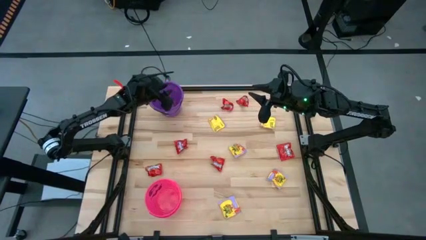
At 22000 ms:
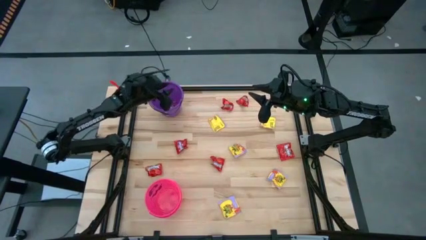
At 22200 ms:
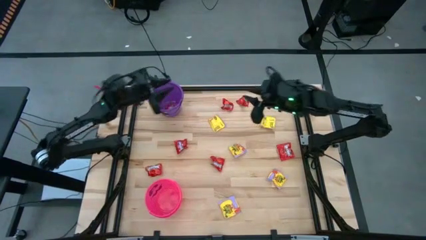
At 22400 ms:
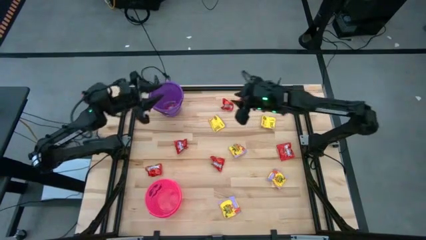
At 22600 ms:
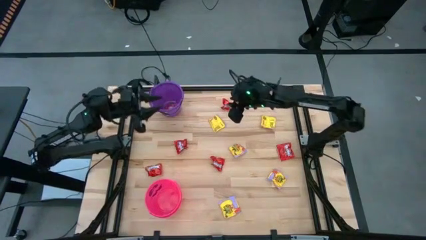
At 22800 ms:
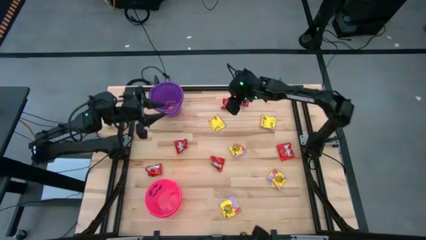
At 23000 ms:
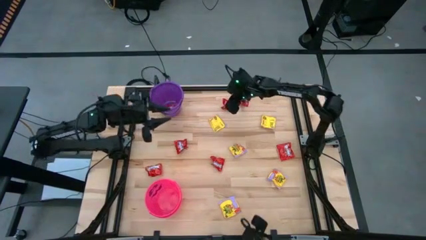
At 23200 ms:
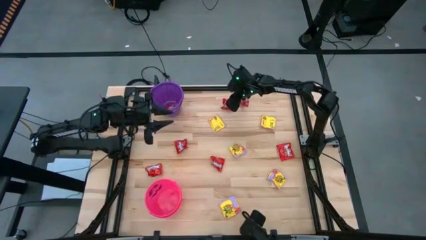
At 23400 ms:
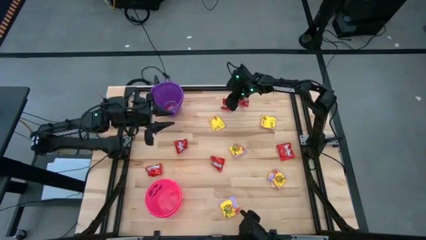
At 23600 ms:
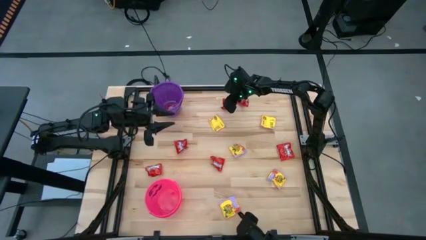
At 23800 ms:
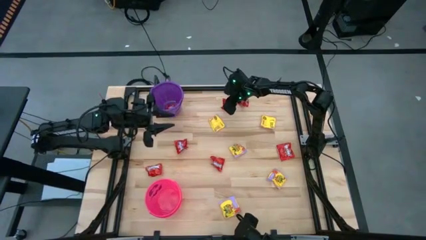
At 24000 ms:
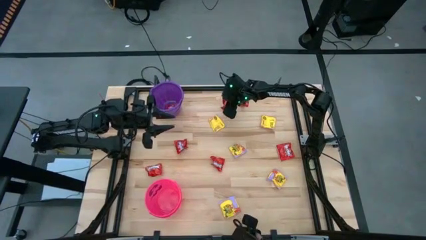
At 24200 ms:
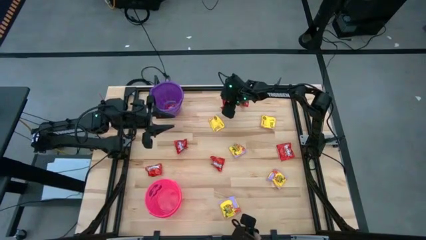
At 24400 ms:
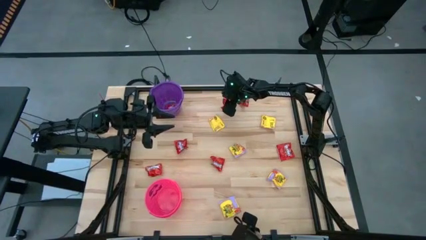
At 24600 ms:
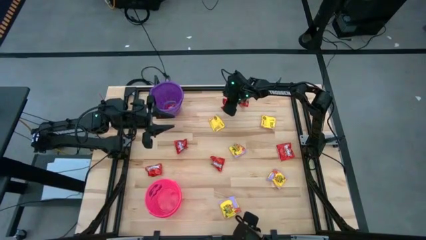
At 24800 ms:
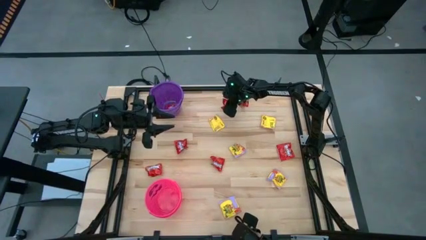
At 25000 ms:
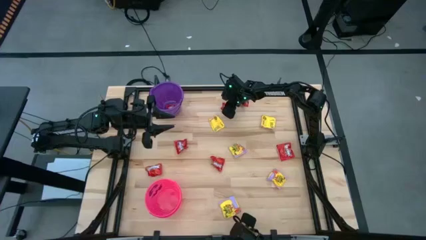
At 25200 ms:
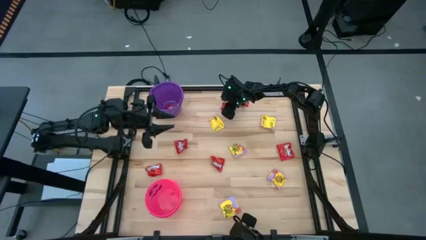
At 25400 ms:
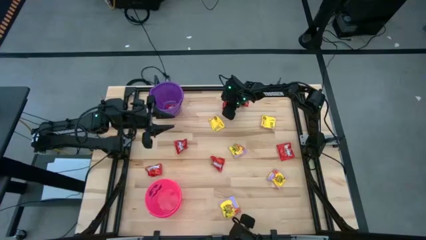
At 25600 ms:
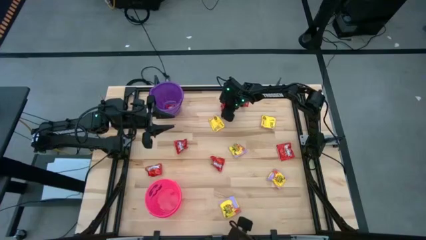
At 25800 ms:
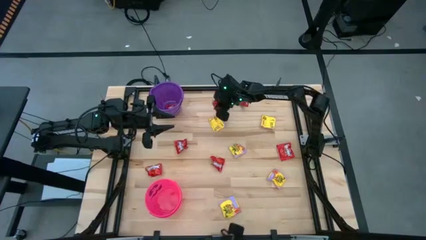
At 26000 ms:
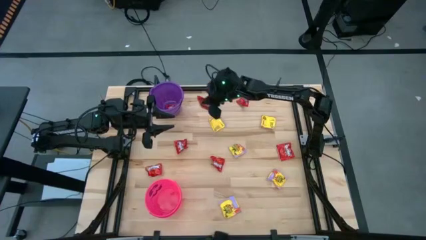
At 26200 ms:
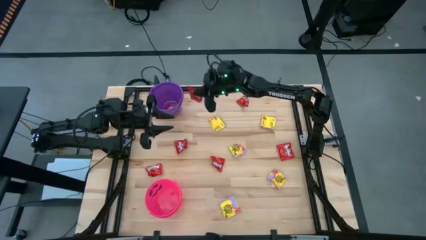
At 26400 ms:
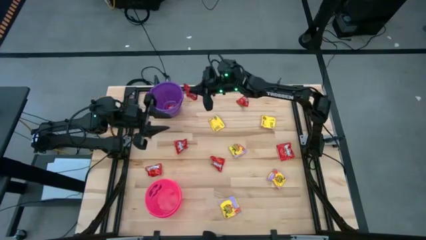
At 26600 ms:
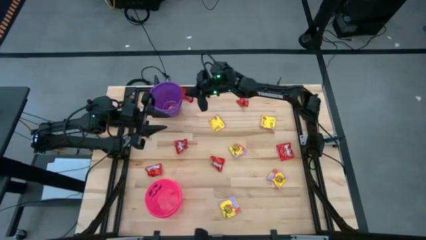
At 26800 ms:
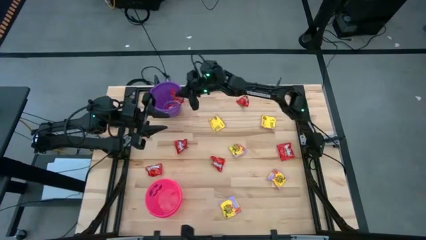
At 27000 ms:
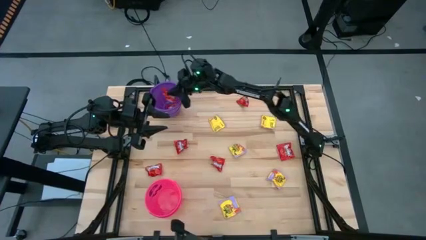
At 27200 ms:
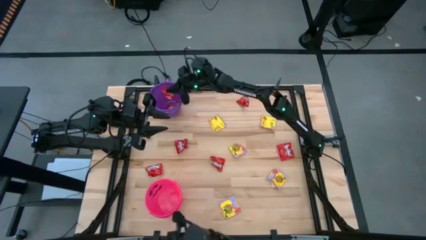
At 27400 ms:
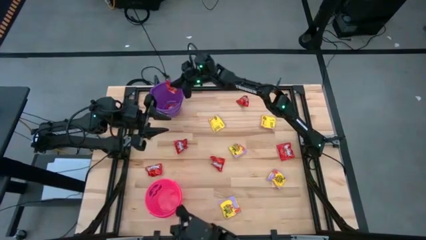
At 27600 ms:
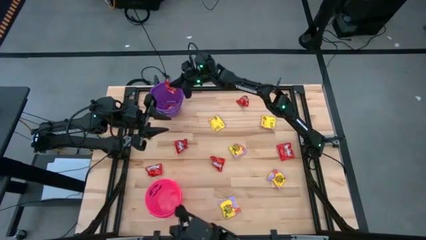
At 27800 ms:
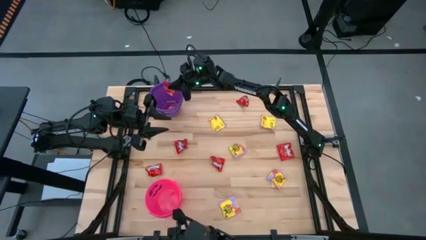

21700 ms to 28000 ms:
Task: Sort candy by brand, put in halloween buckets
Put the red candy into the purple bucket

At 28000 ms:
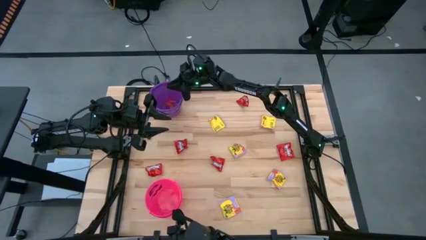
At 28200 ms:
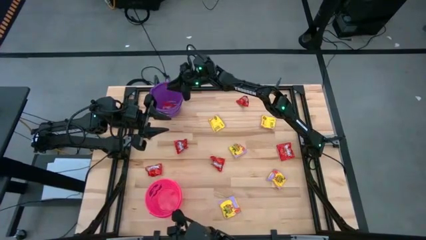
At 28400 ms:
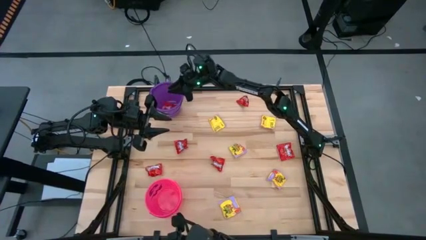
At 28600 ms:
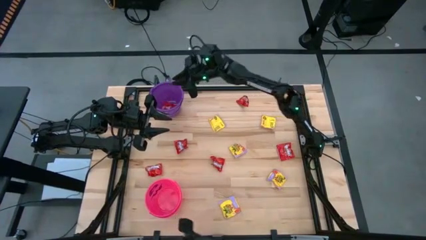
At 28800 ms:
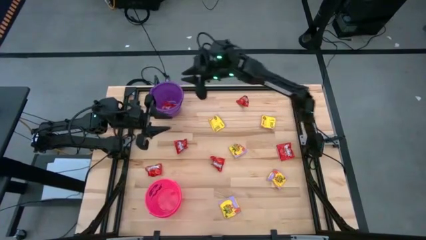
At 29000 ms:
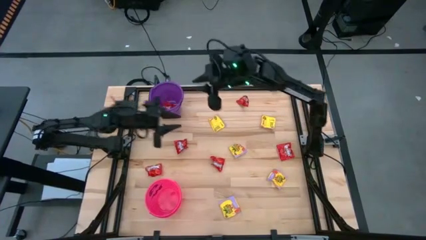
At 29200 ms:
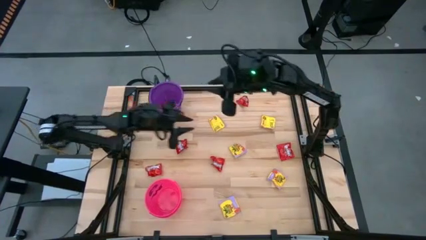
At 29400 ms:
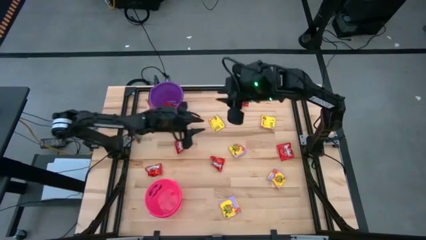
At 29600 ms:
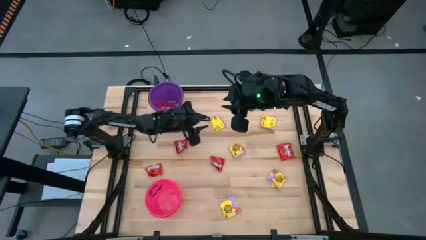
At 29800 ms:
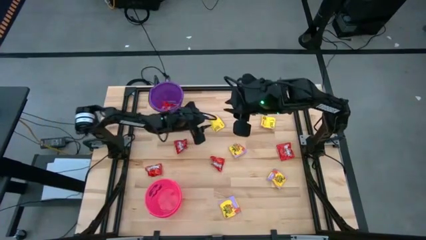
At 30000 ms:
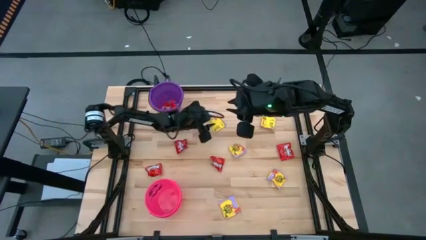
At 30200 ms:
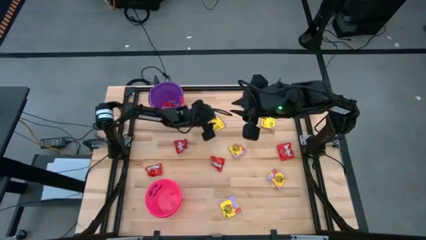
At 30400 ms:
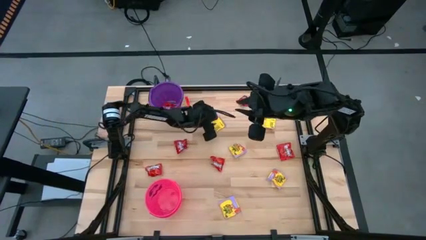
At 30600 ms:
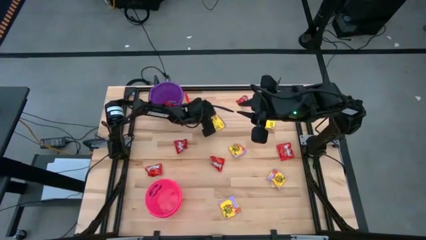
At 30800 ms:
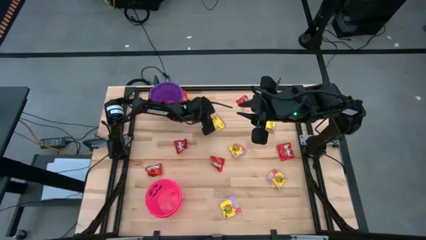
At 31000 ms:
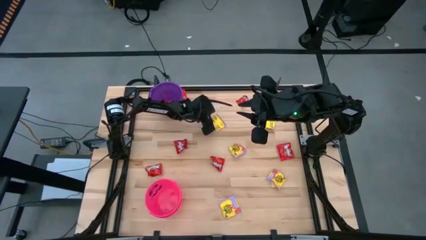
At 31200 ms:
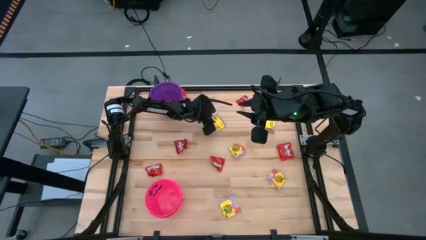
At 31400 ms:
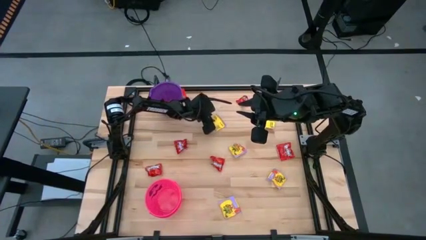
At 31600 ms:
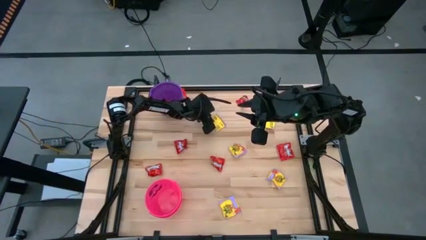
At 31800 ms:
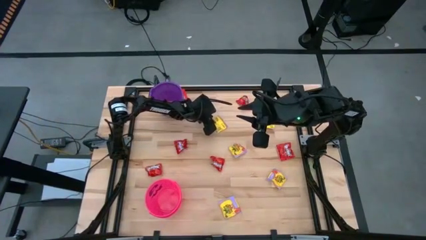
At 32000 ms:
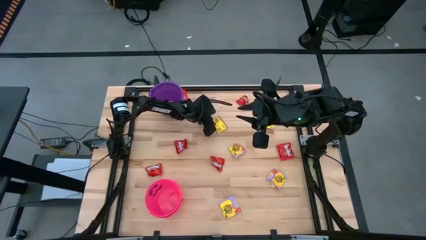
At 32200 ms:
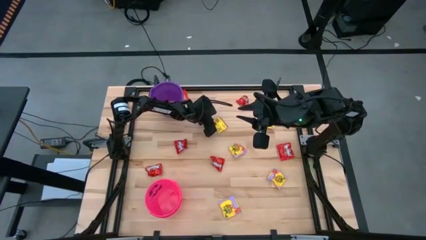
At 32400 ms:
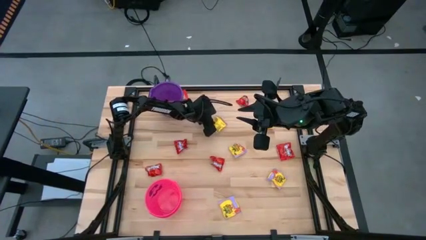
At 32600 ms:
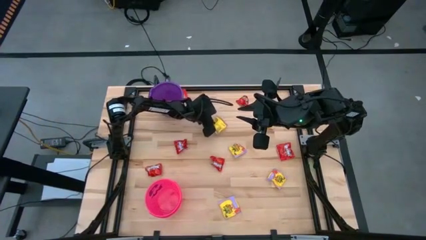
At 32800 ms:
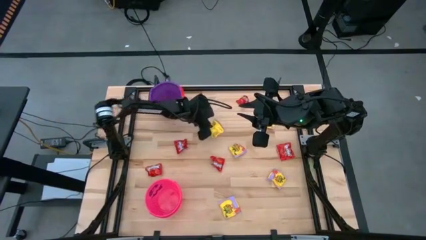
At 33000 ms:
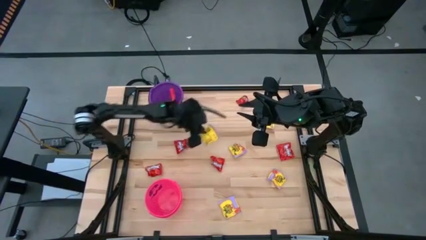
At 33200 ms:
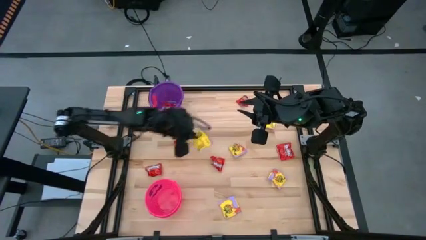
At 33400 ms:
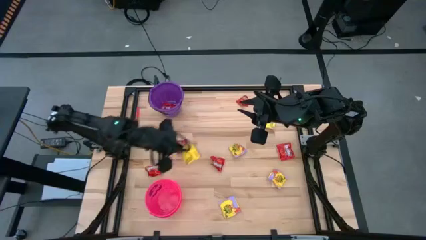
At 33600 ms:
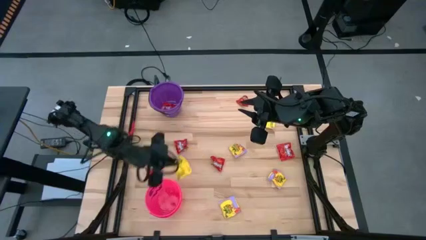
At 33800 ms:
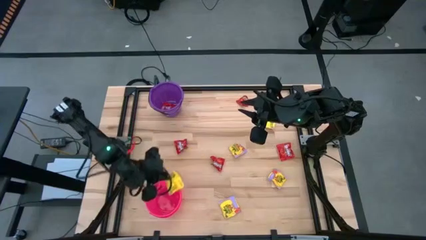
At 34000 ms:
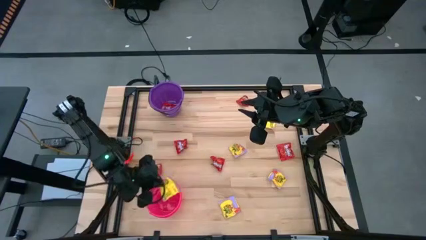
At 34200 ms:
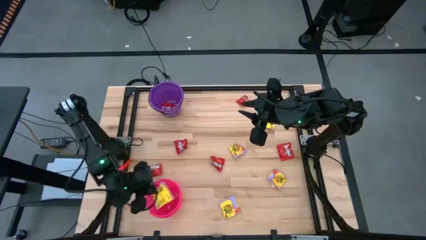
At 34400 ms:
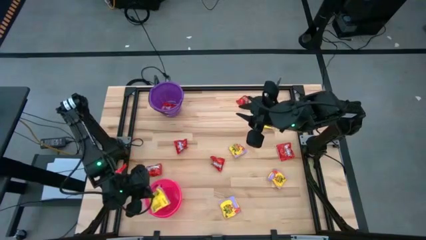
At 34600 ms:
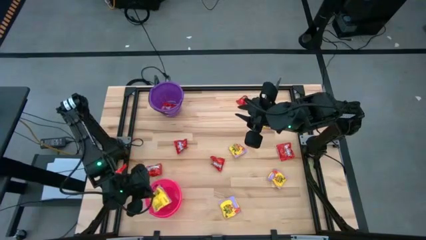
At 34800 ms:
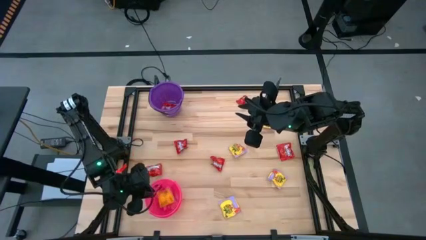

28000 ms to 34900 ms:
Put the yellow candy into the pink bucket
